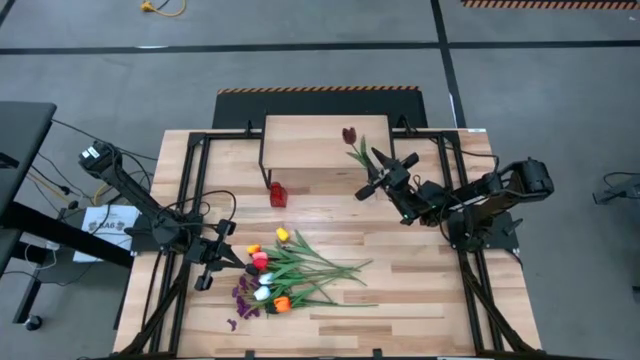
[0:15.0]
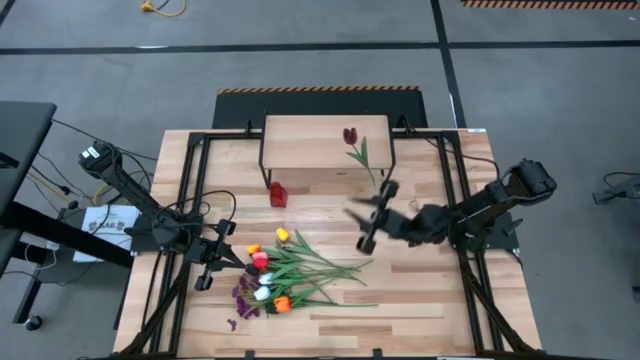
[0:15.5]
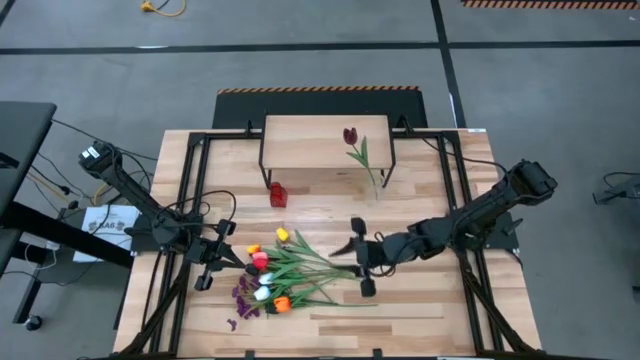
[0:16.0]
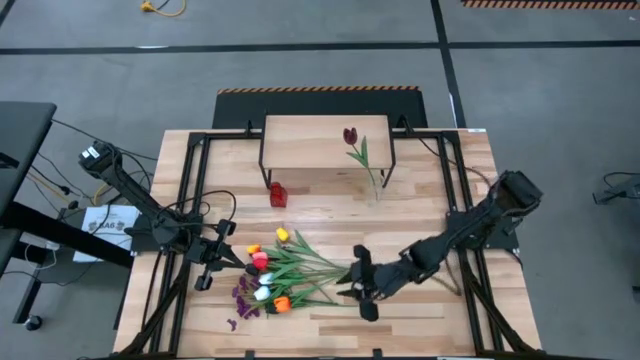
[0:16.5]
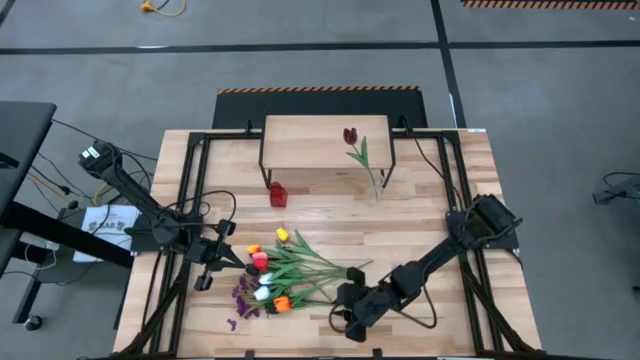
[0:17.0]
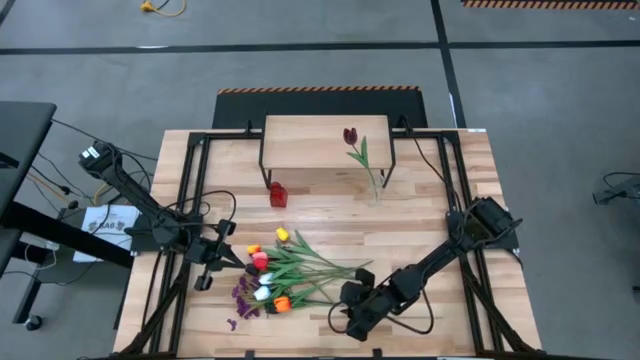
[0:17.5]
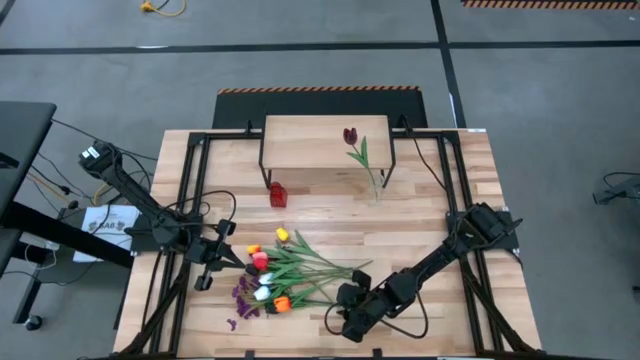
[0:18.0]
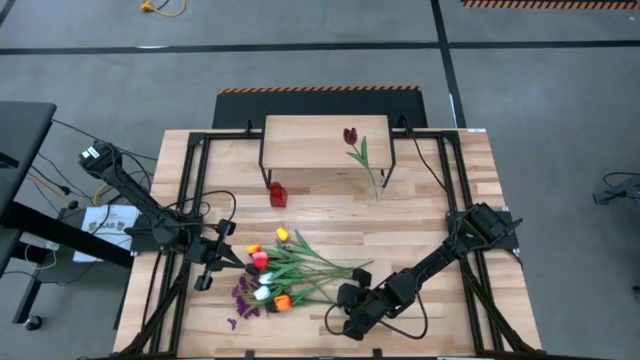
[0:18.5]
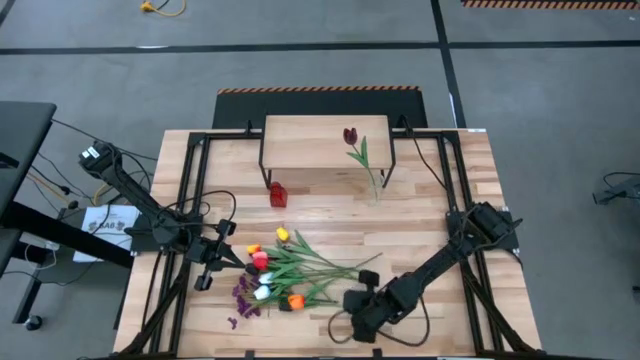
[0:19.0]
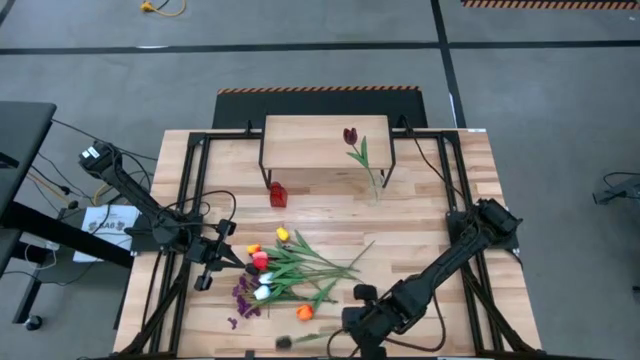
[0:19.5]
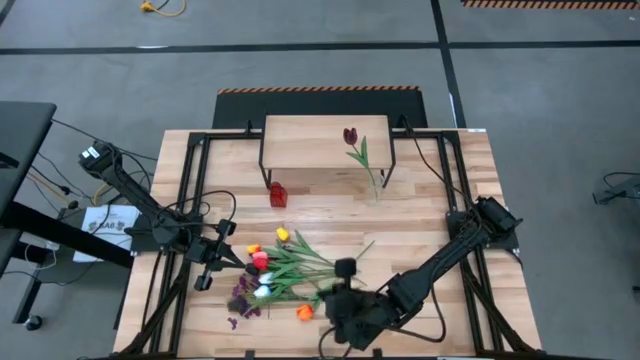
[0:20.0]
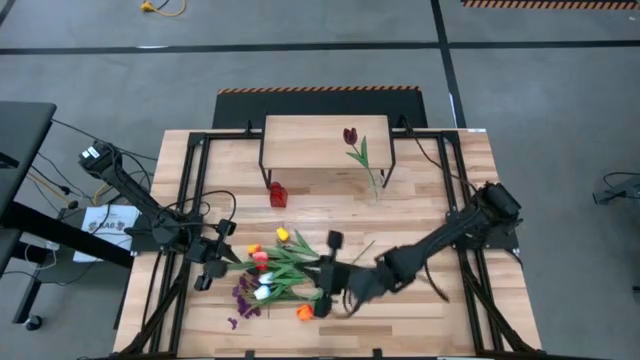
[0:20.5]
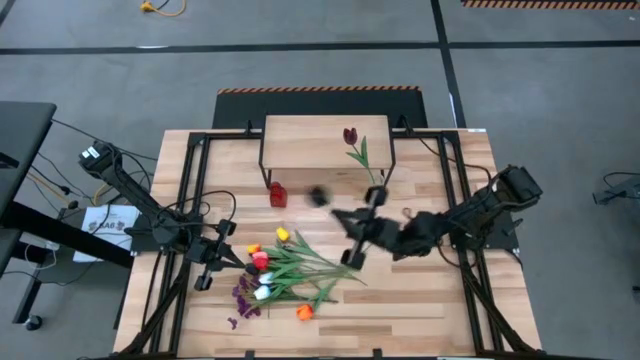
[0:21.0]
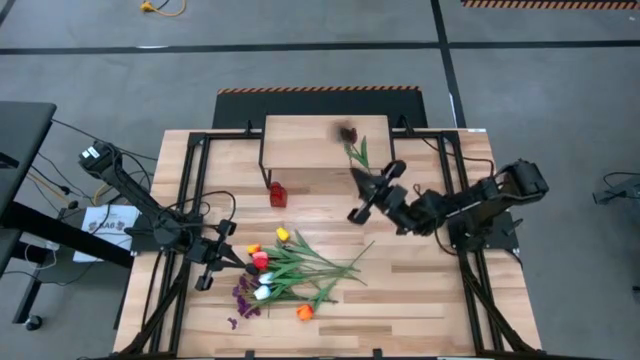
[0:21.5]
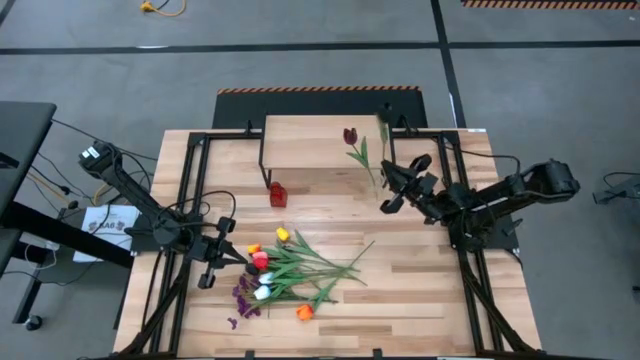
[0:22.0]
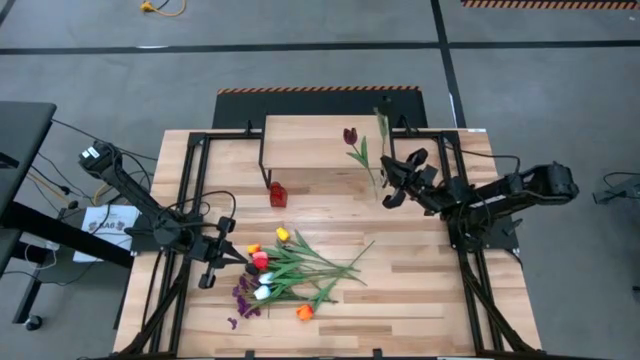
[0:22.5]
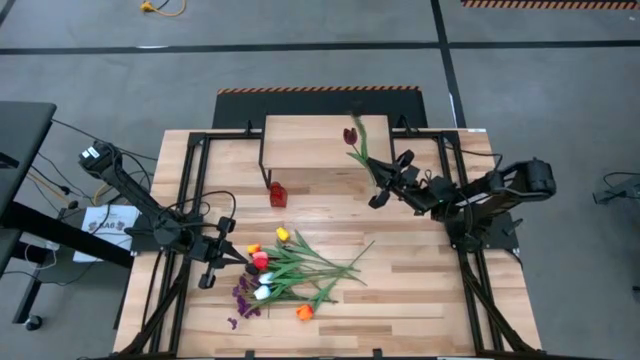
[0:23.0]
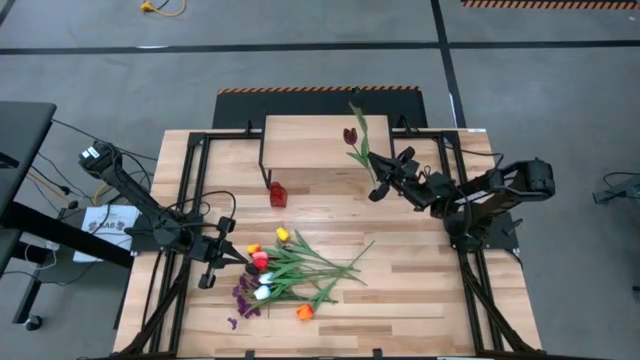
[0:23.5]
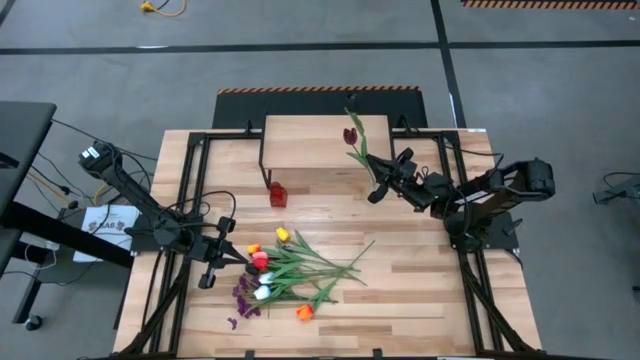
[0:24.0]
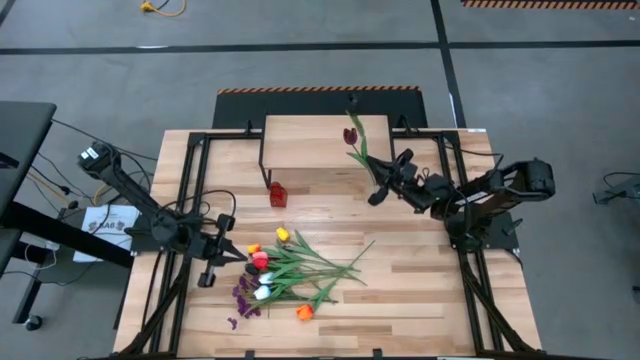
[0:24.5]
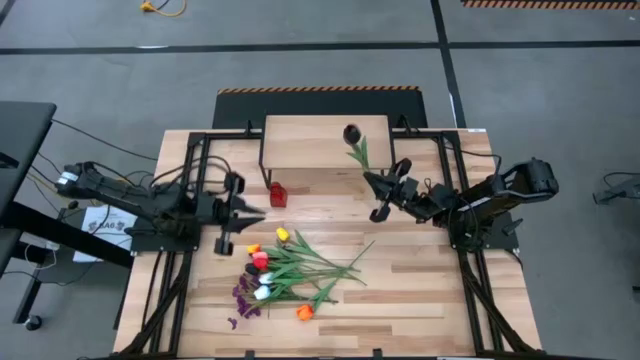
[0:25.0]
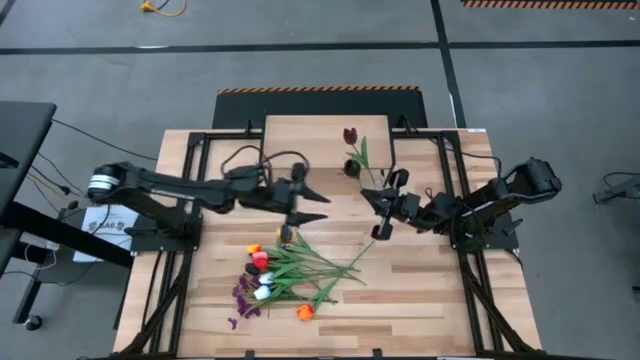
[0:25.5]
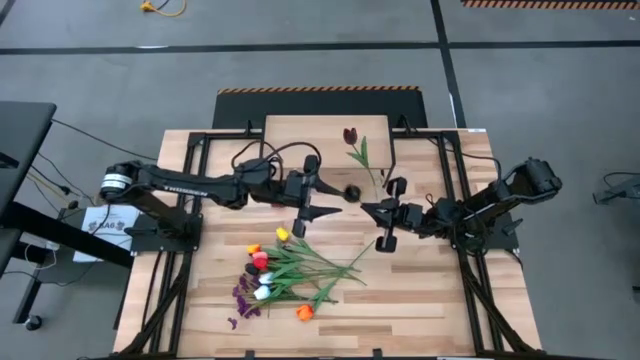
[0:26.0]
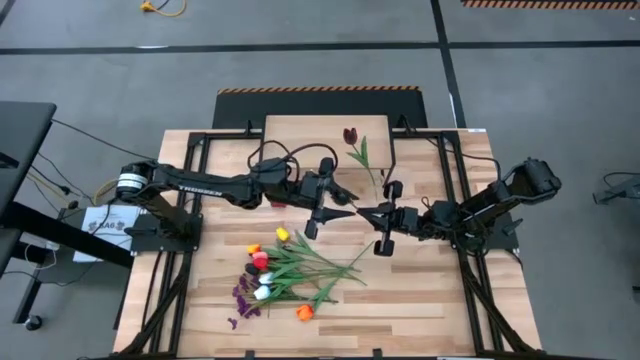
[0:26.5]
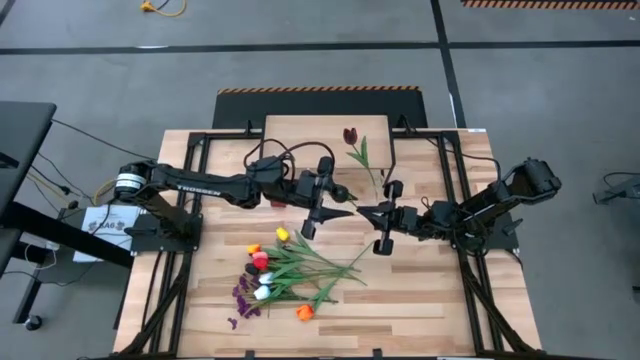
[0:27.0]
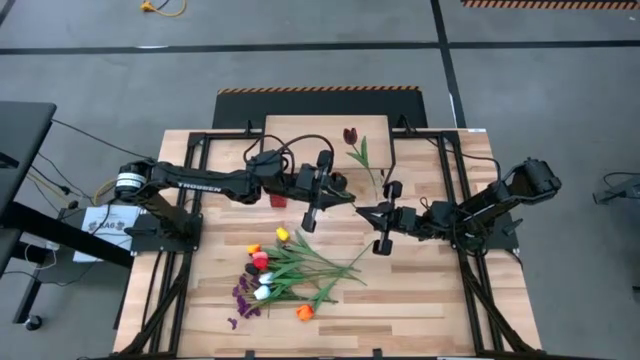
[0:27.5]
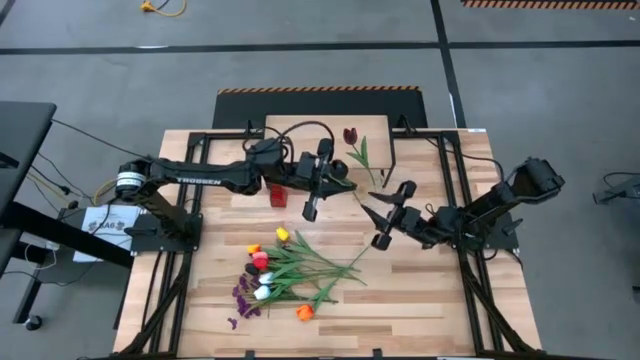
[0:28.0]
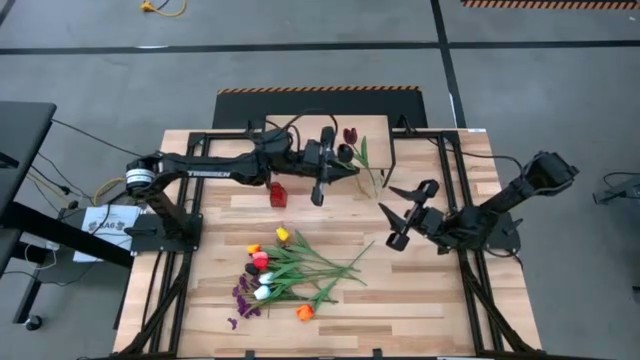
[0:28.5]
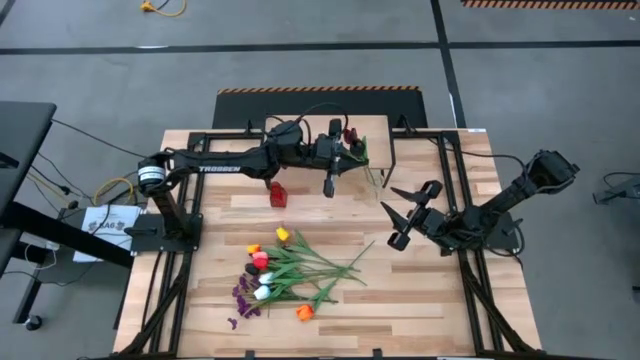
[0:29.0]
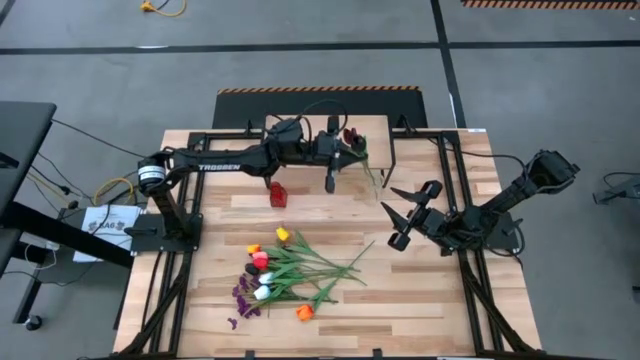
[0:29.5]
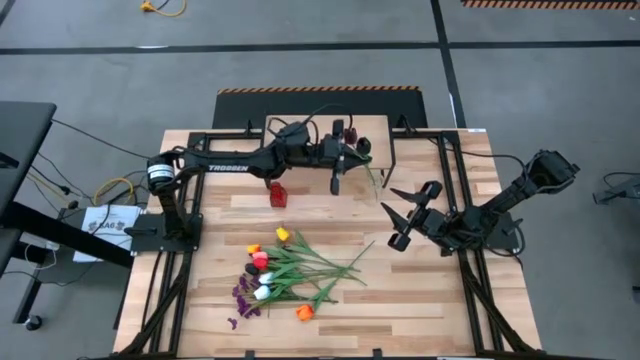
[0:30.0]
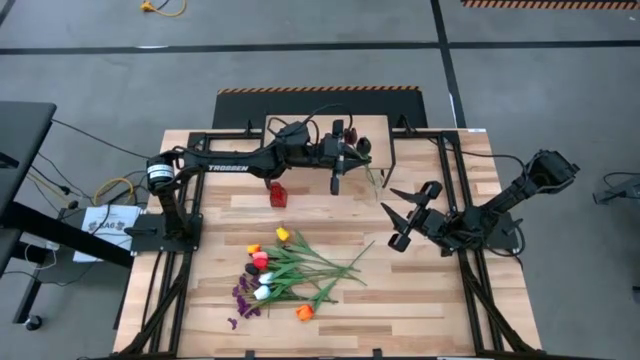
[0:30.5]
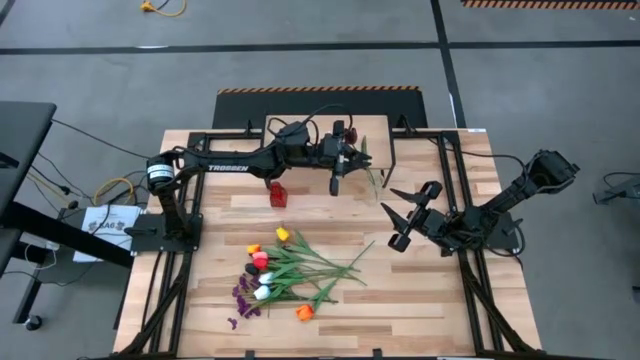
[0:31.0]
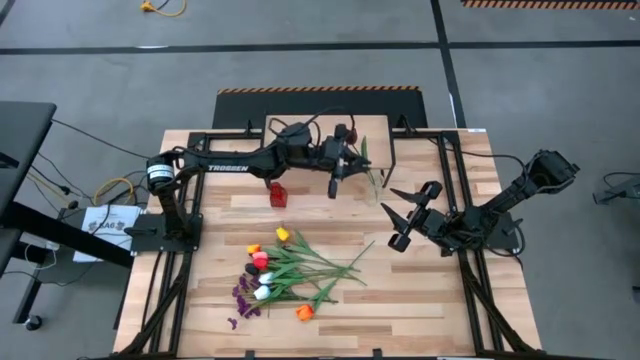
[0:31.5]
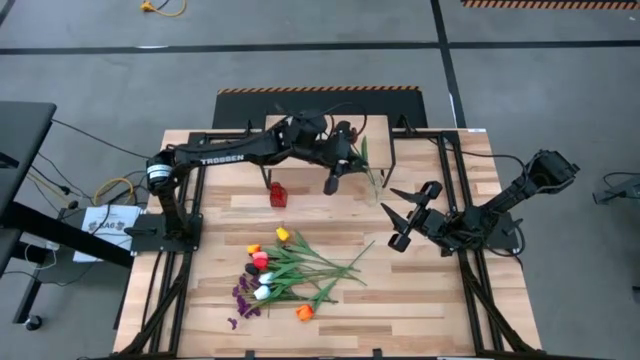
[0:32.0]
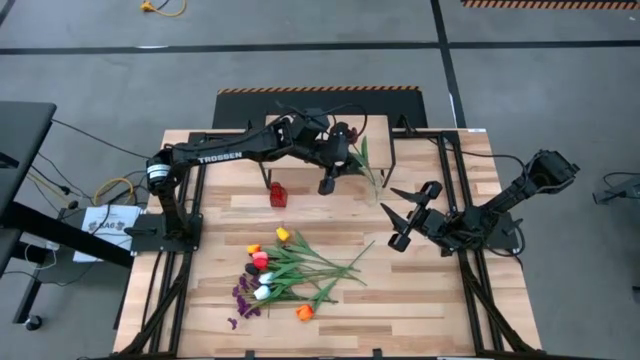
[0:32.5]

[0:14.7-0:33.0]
Task: Pick and place flowers into a vace then onto a shelf
Put the black flower into the transparent vase
